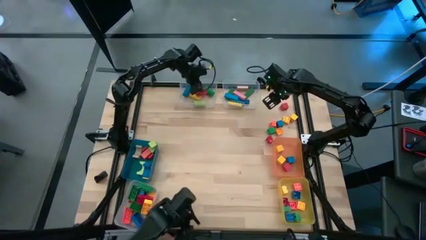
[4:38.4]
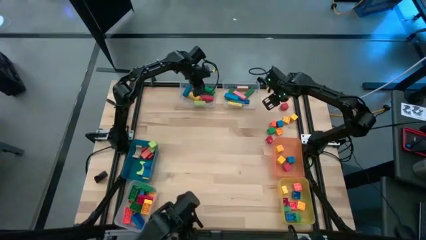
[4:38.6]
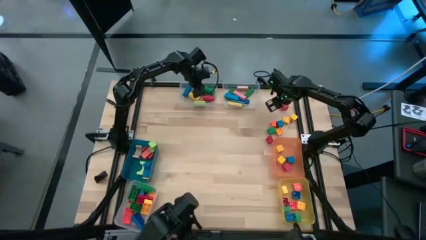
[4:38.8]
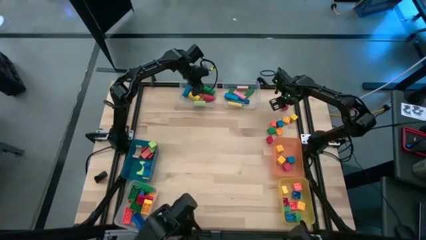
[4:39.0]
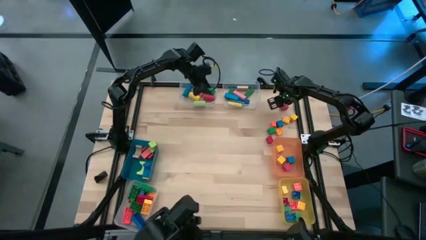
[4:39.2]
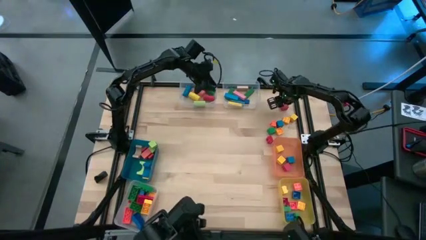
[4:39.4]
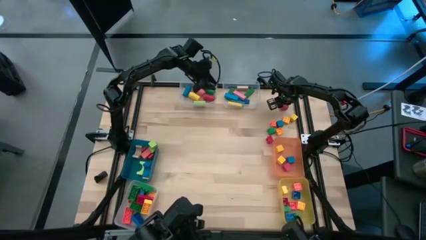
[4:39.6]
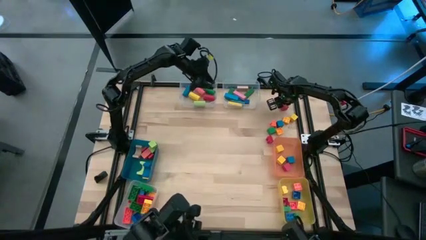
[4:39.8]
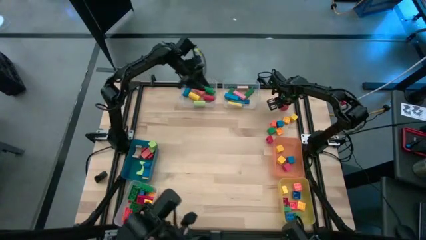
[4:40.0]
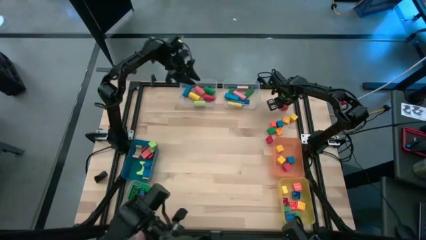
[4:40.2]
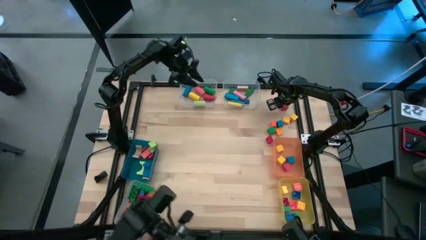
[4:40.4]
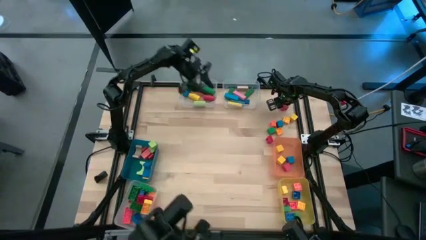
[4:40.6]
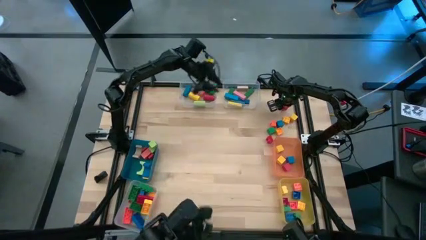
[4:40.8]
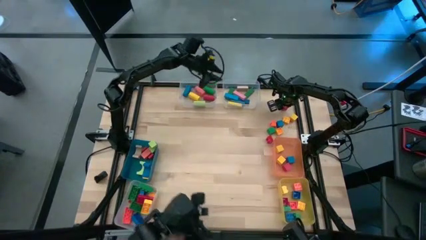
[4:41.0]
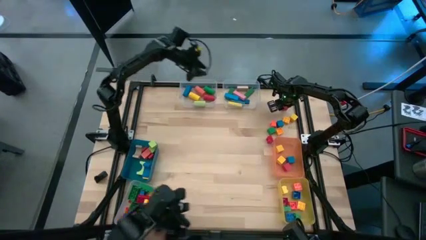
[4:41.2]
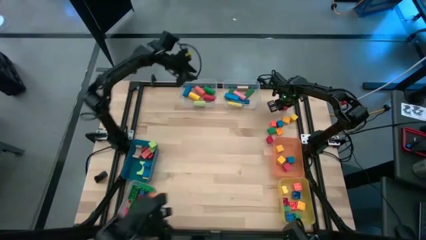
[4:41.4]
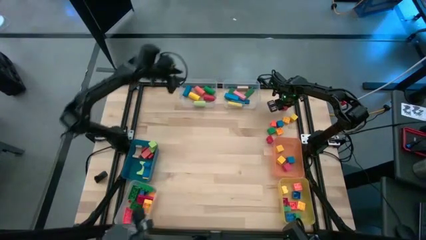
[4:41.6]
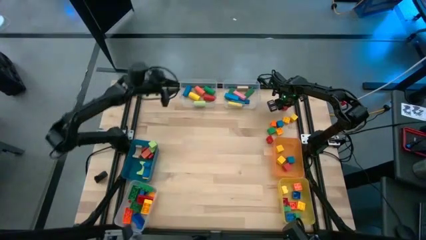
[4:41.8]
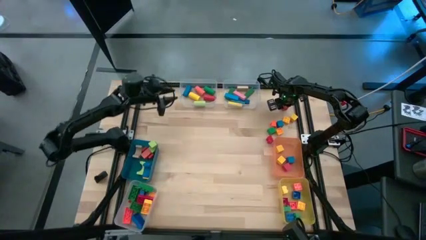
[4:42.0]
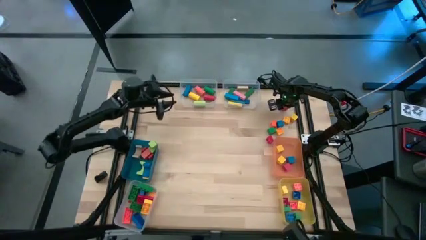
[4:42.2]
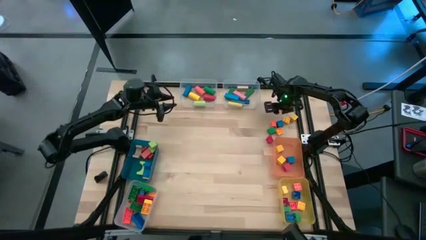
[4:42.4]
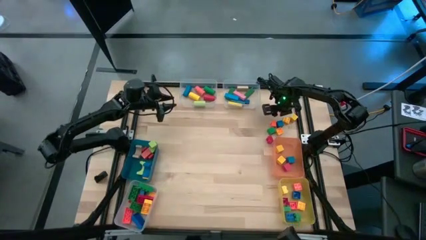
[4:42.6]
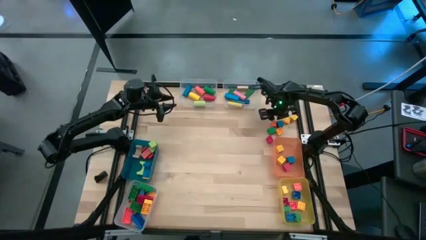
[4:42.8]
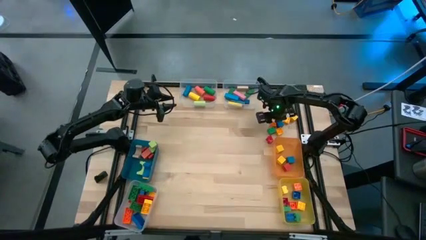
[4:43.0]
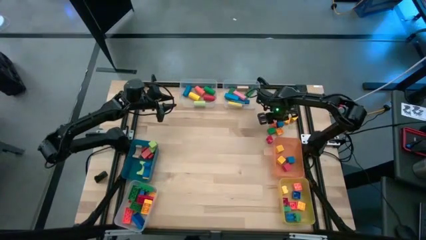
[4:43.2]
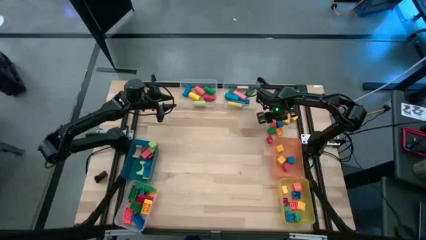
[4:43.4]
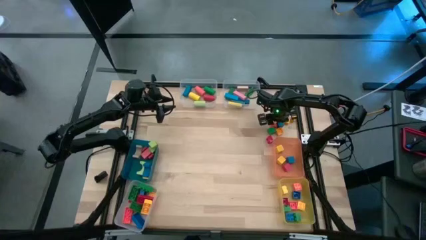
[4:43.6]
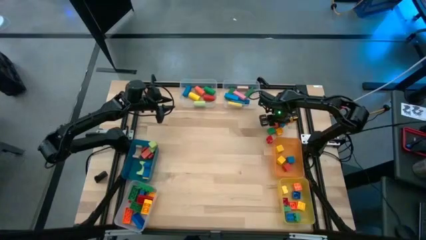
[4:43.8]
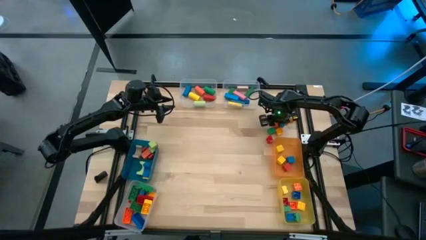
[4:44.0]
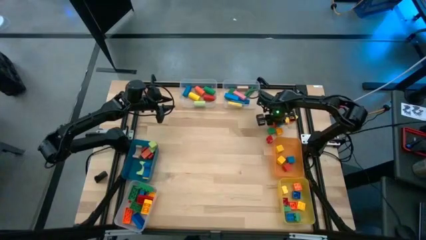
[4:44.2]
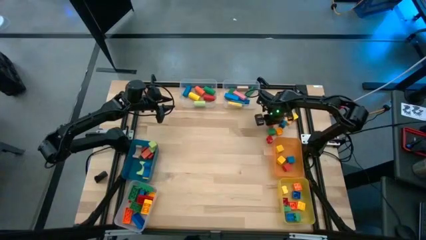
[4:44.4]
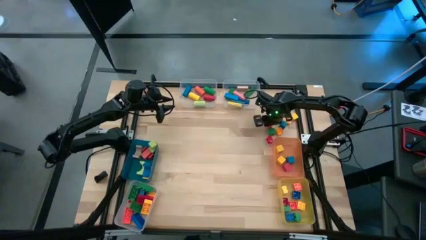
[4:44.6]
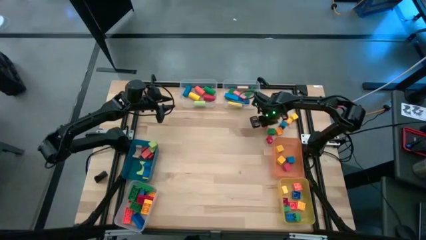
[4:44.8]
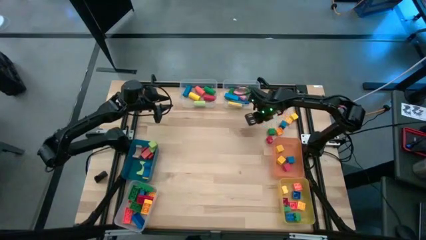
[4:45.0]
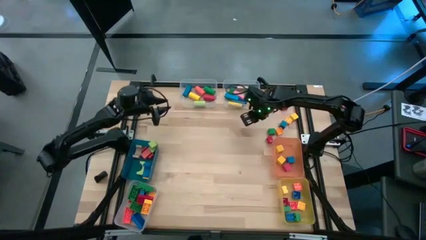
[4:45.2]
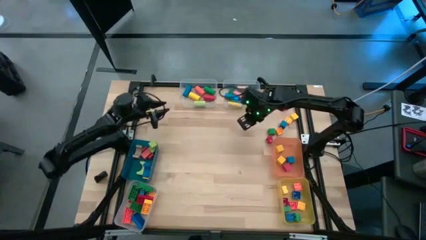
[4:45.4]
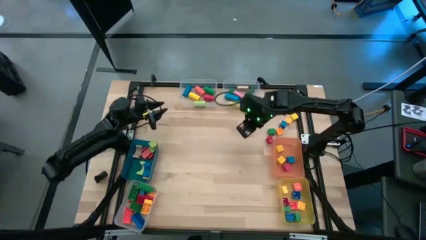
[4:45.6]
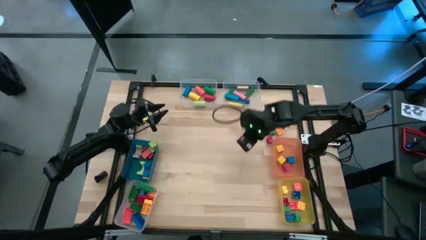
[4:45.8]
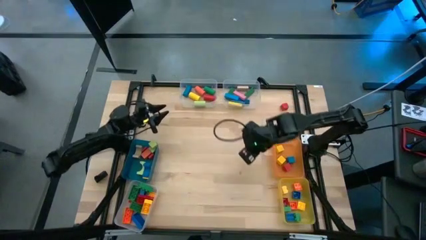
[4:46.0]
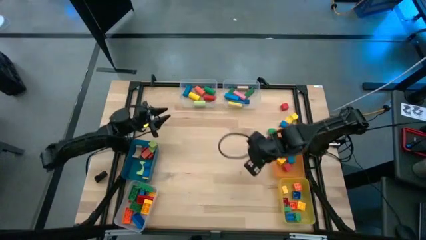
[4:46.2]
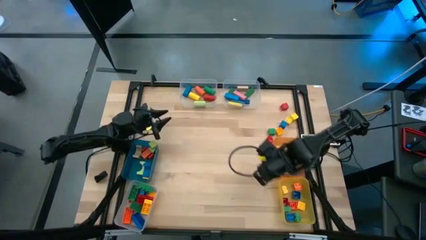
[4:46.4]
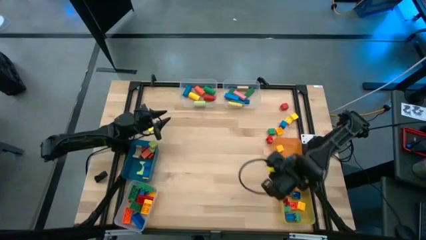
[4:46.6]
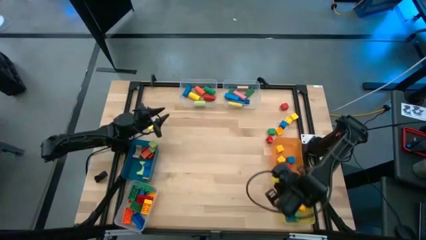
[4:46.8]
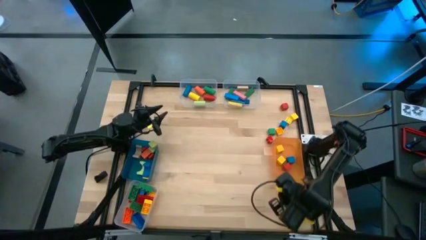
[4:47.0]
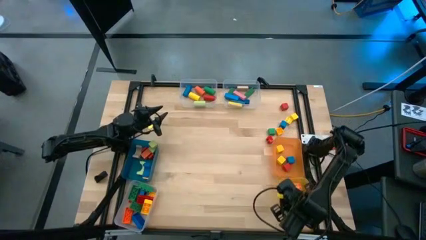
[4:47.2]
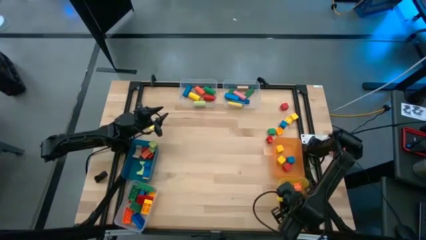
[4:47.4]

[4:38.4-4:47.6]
Task: Sort blocks by size
Put the orange game piece into the yellow bin

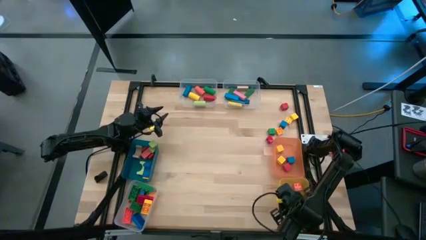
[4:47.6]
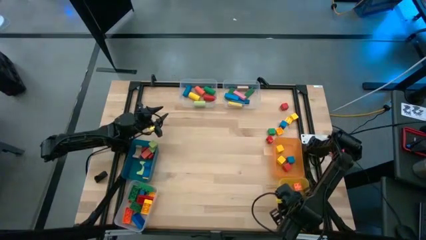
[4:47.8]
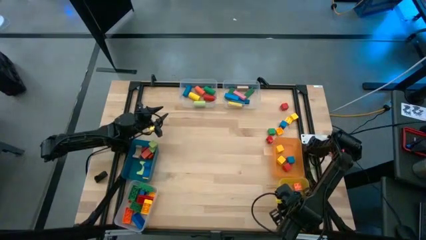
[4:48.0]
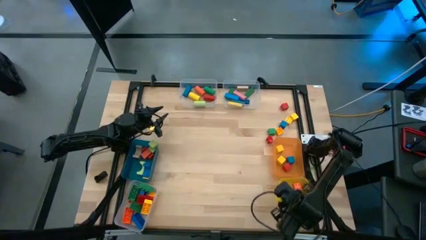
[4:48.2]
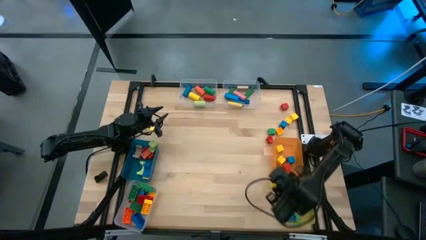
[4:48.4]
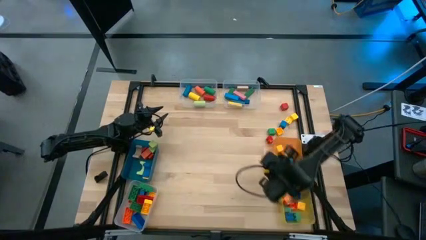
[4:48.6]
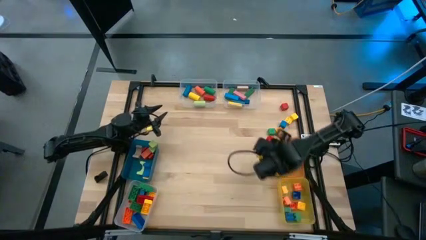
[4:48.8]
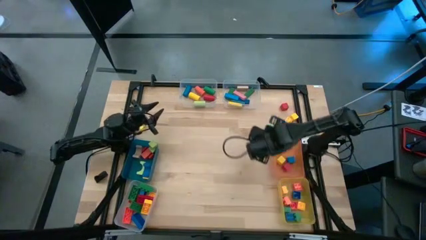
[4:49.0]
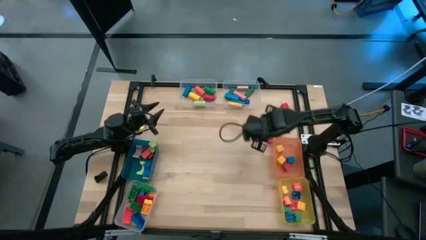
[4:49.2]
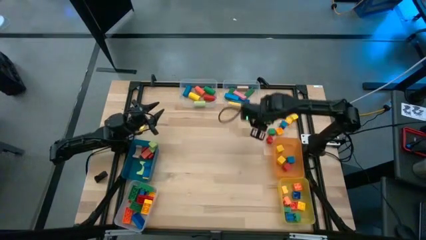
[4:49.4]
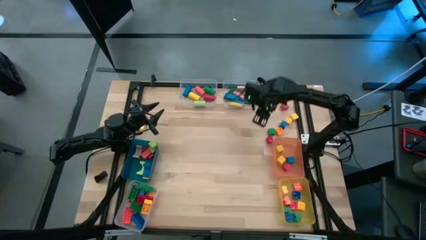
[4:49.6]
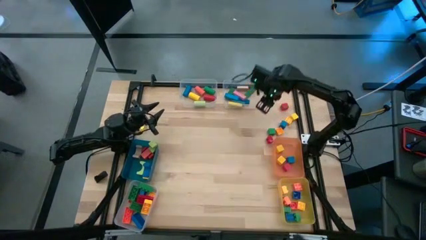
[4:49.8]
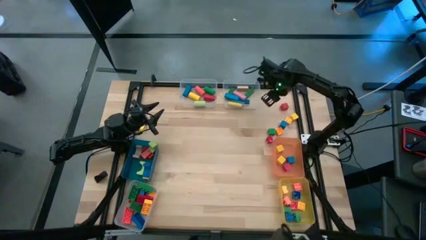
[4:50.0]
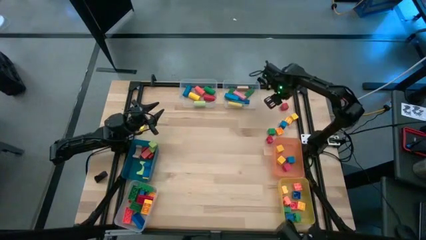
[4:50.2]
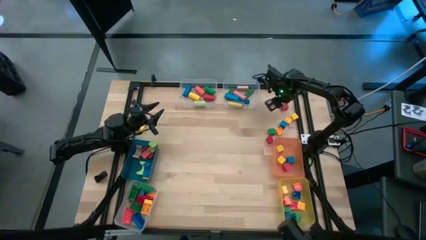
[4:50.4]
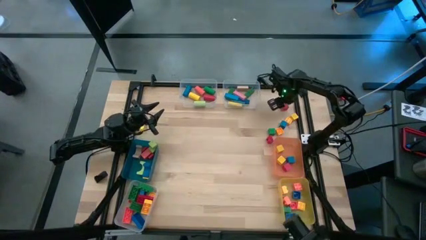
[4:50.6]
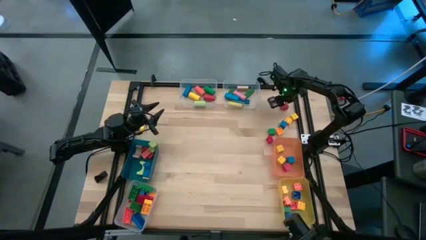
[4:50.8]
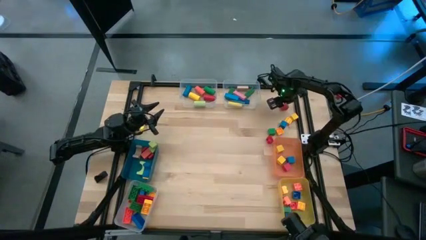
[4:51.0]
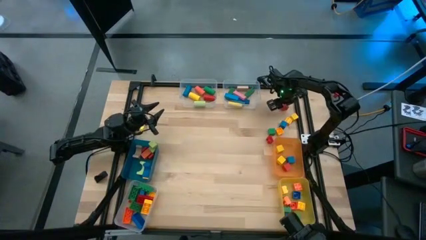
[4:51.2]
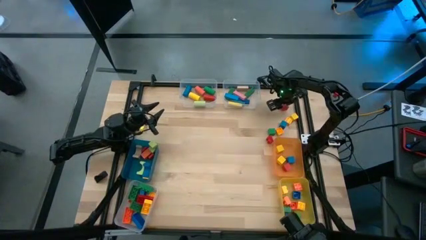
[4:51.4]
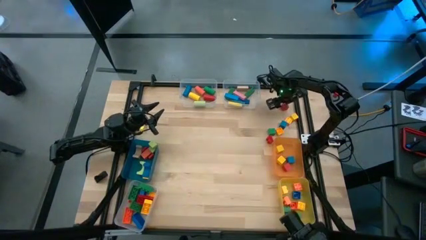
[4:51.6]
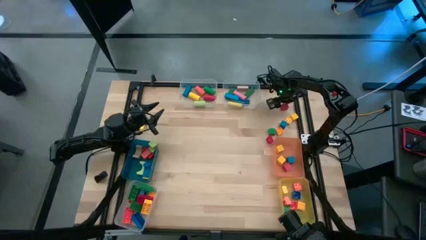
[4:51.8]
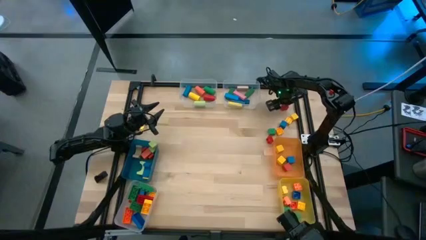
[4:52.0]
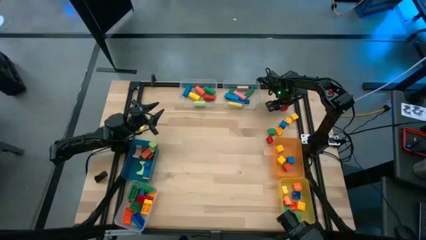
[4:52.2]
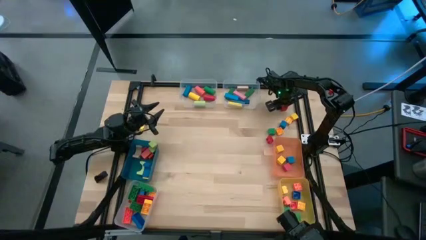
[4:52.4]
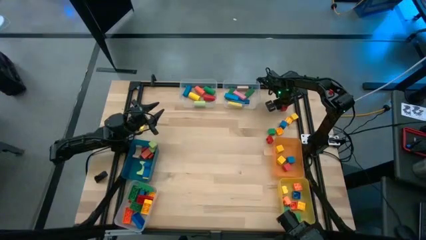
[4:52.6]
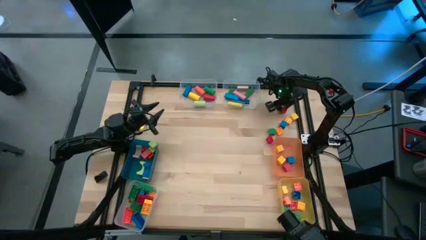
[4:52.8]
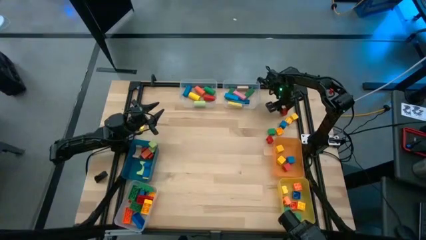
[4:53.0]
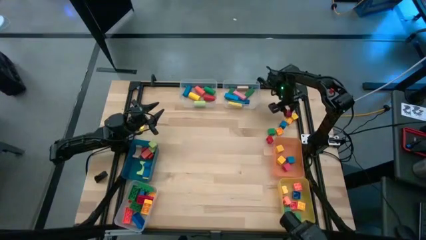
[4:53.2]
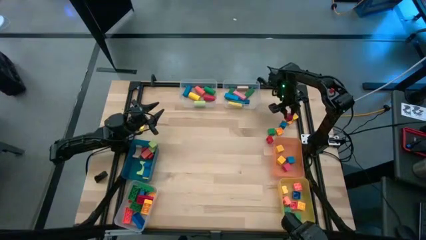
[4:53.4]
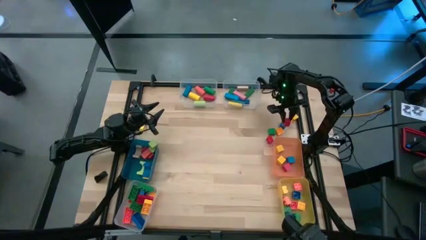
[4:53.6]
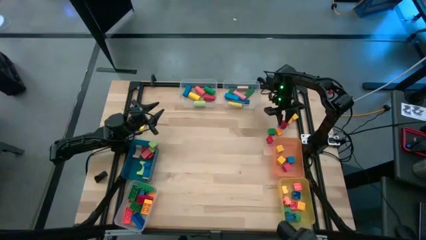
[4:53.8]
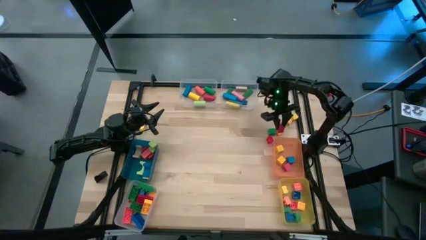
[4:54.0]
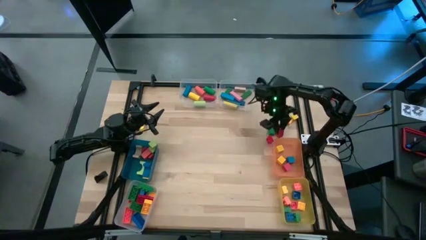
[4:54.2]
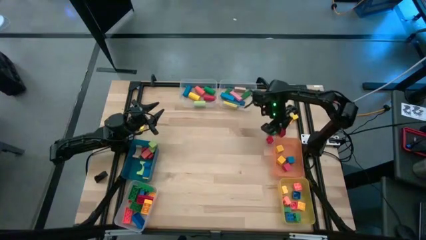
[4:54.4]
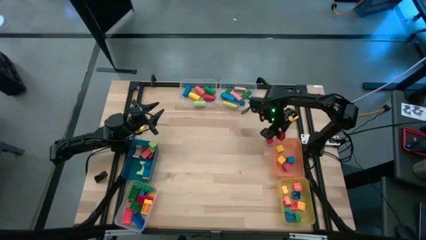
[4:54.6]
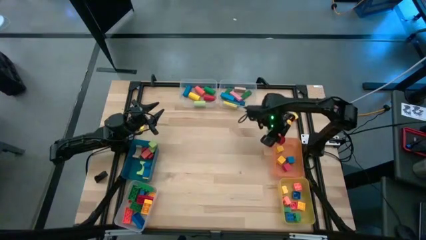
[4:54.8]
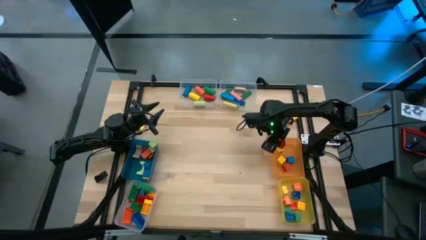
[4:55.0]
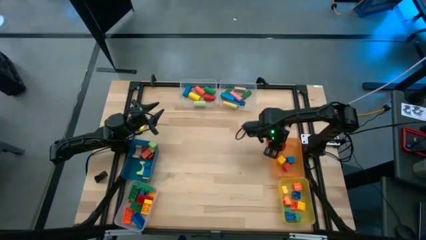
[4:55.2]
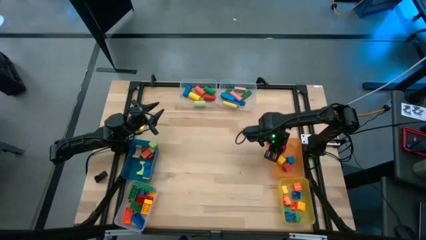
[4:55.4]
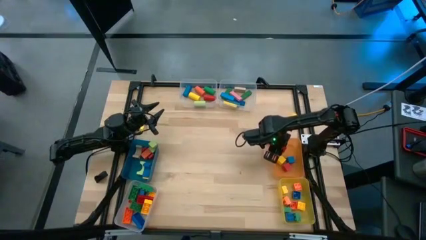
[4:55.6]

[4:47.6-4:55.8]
Put the red block into the orange bin
